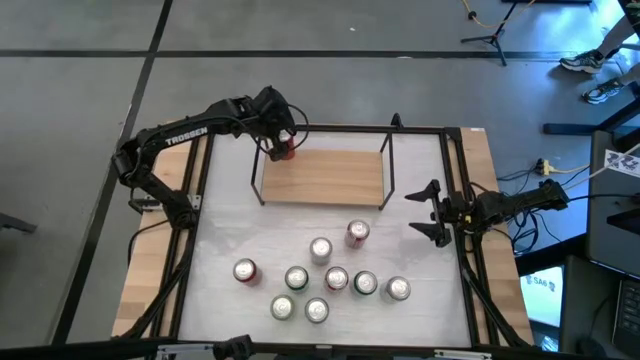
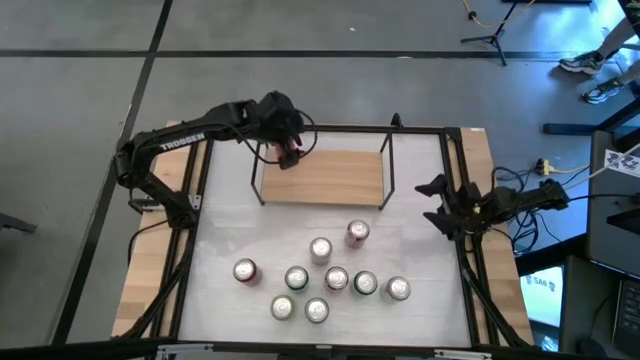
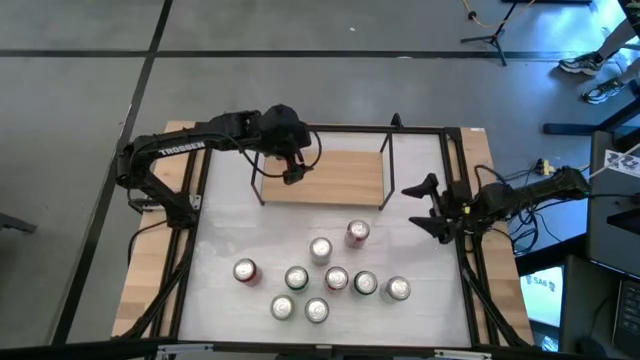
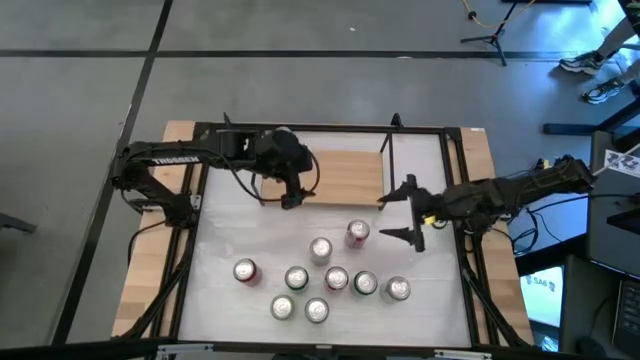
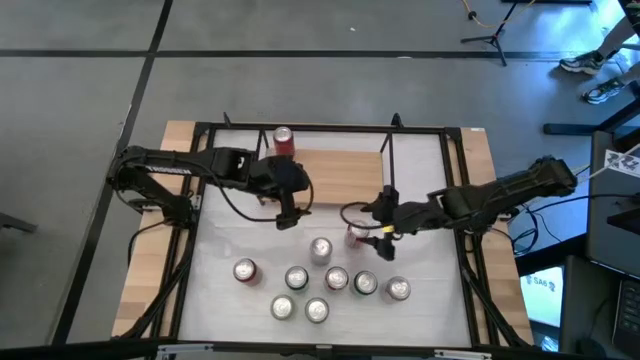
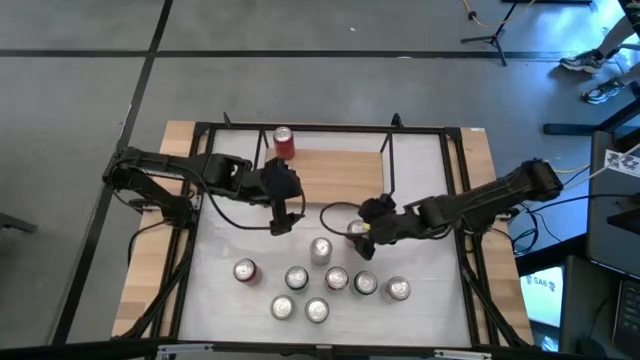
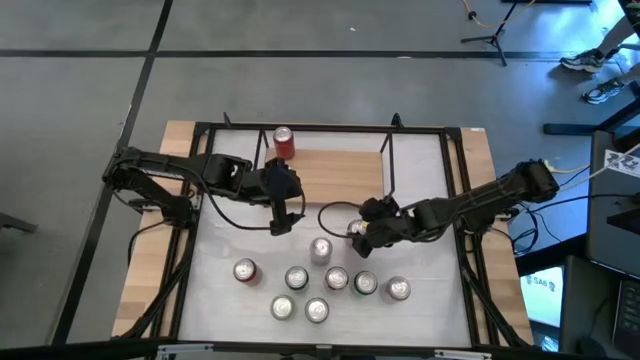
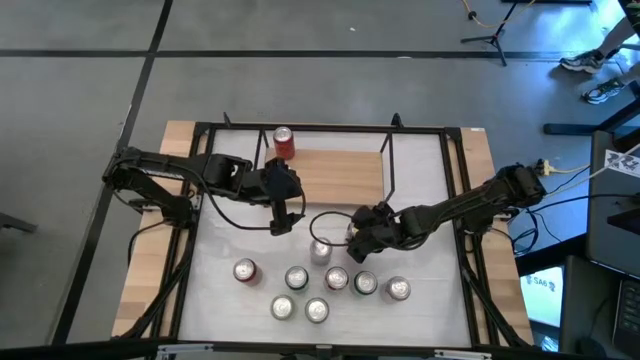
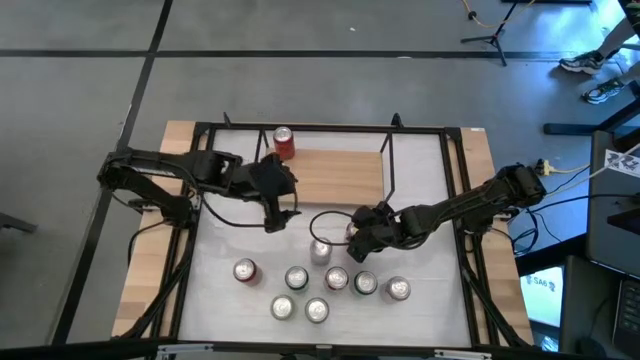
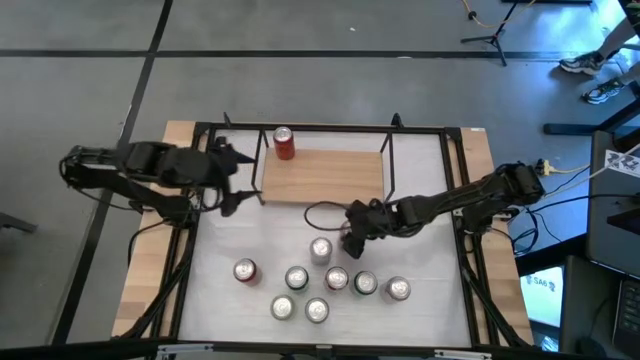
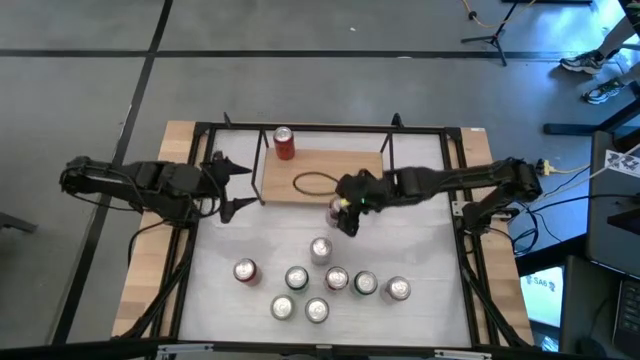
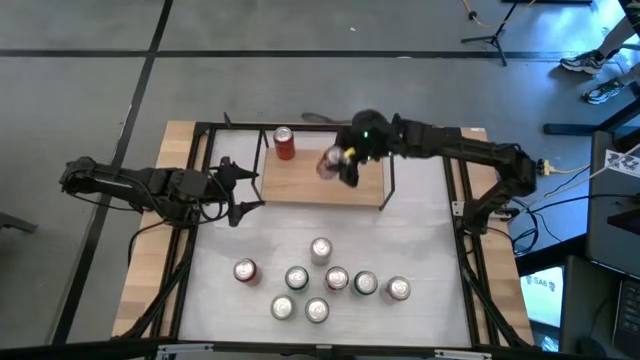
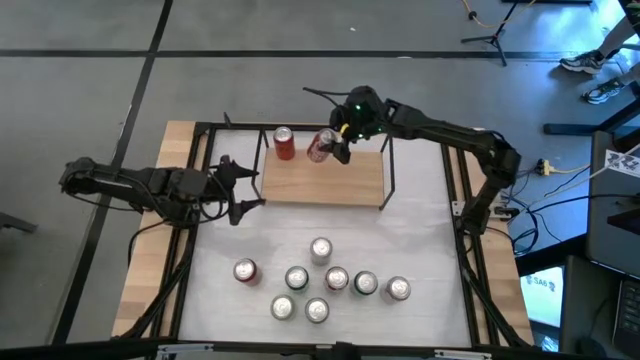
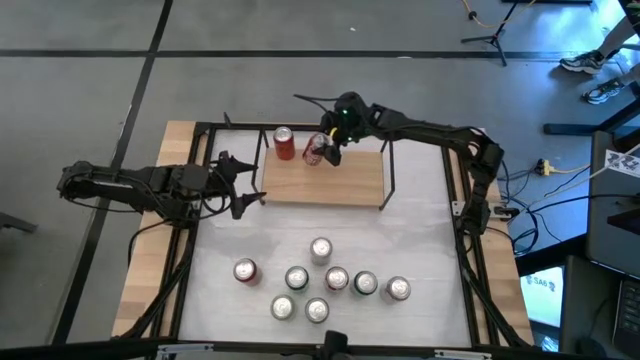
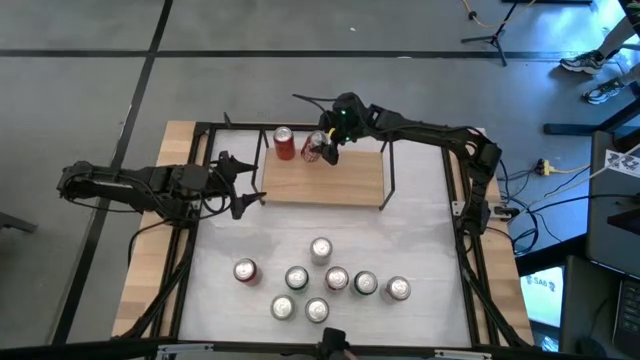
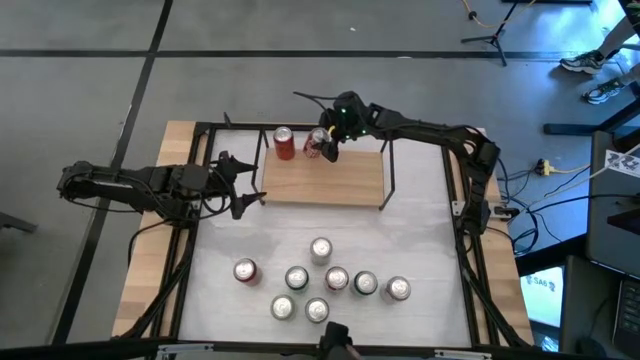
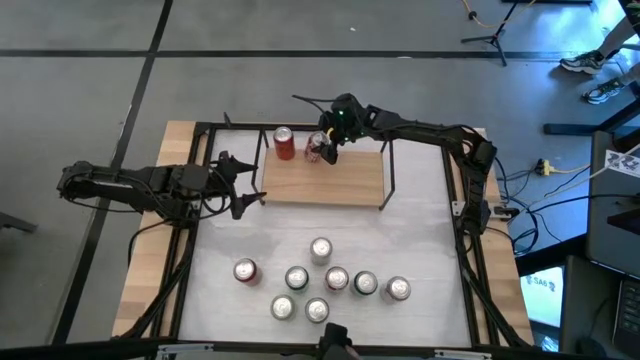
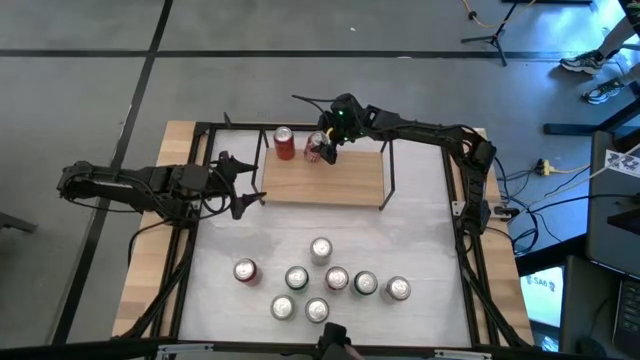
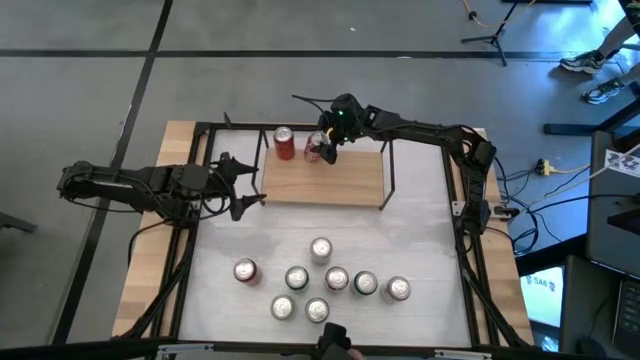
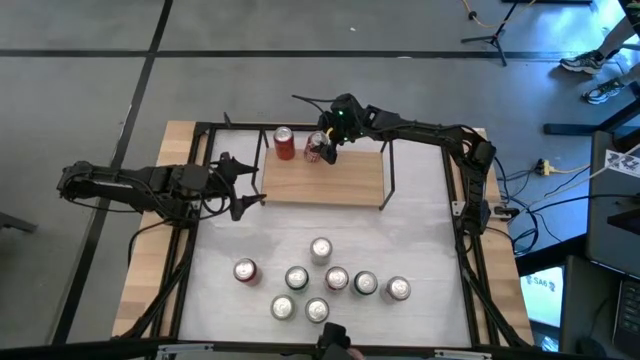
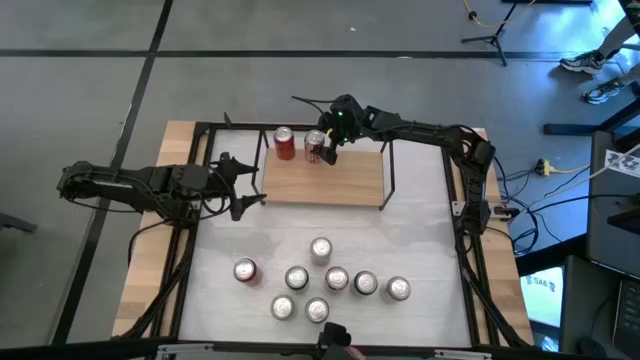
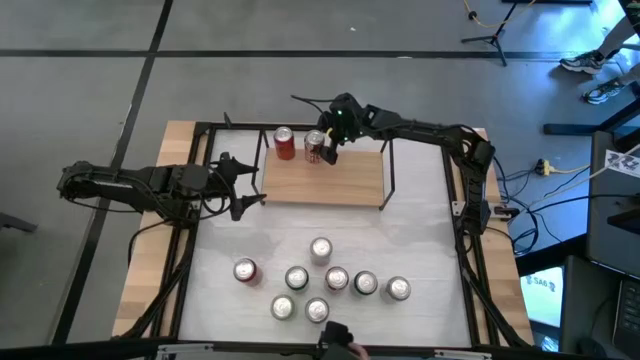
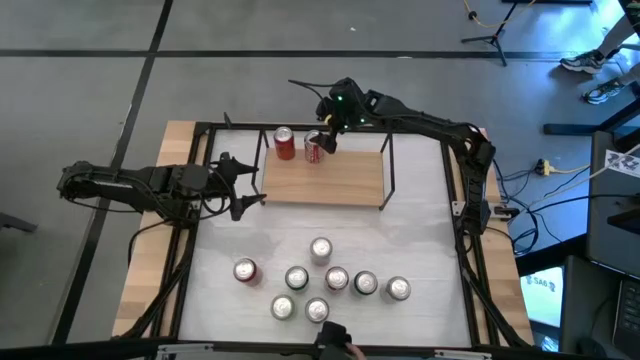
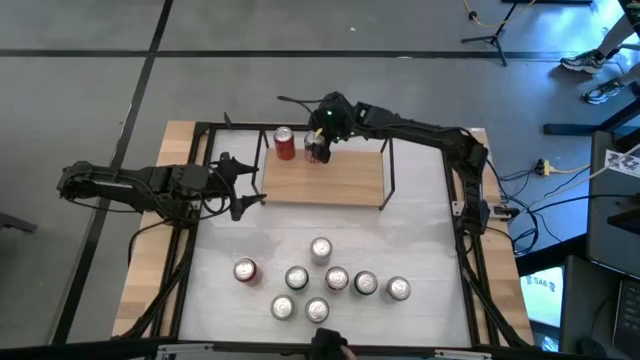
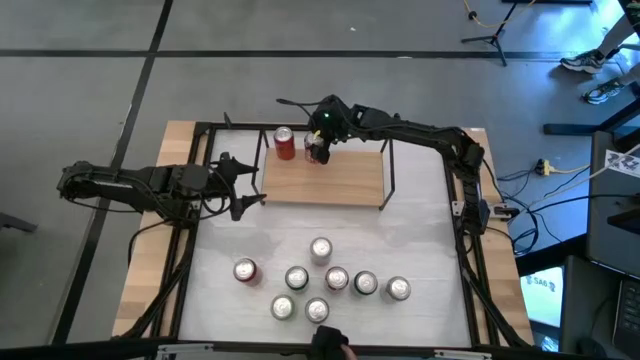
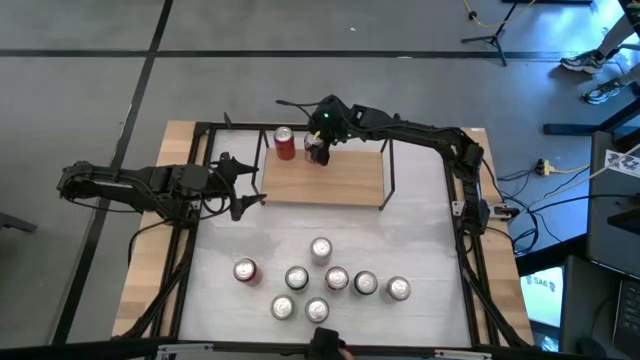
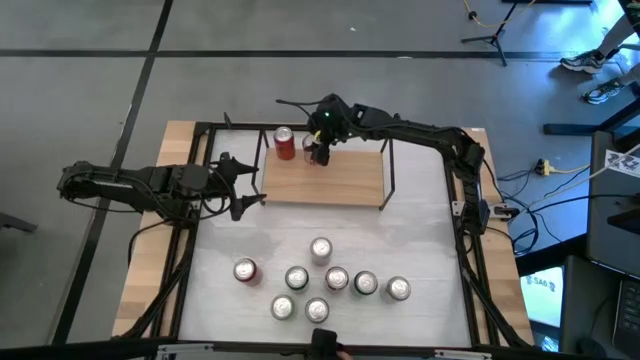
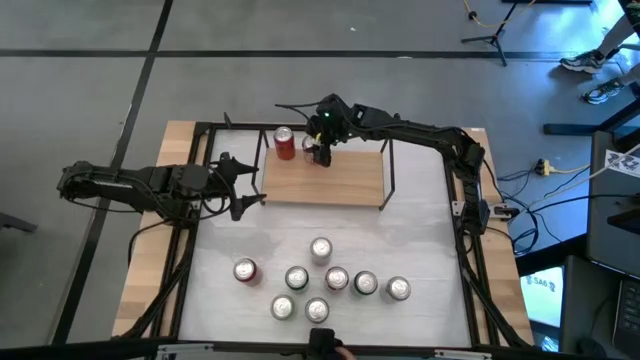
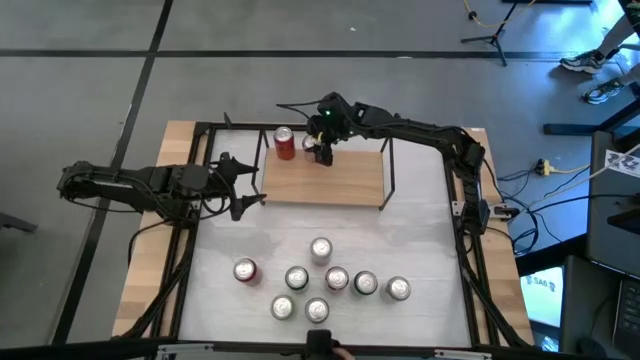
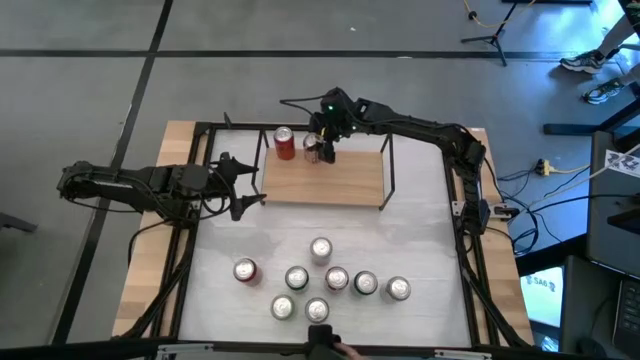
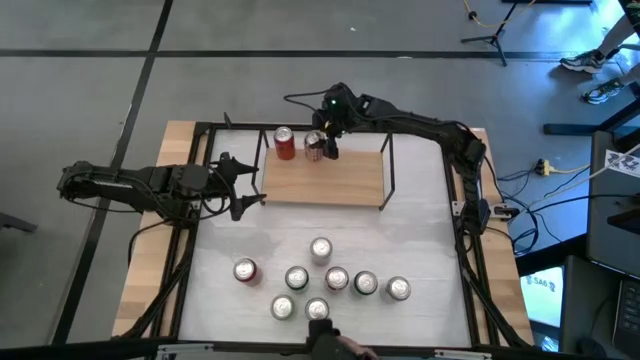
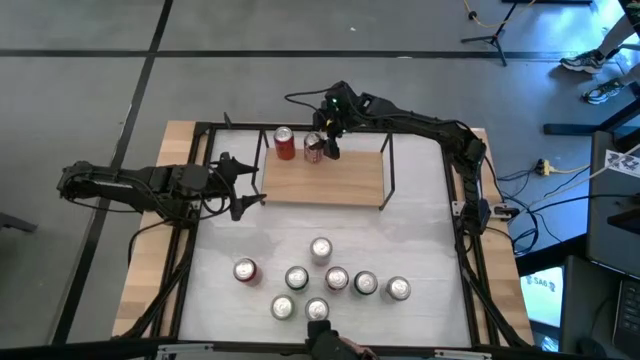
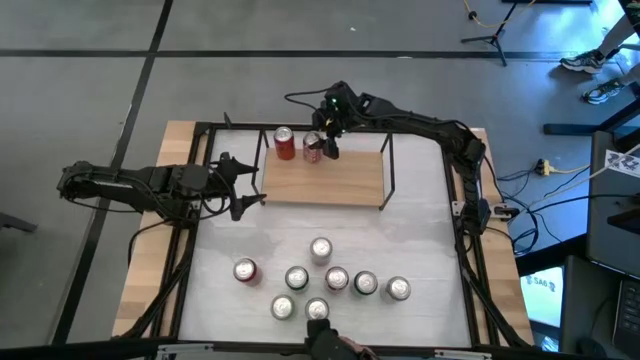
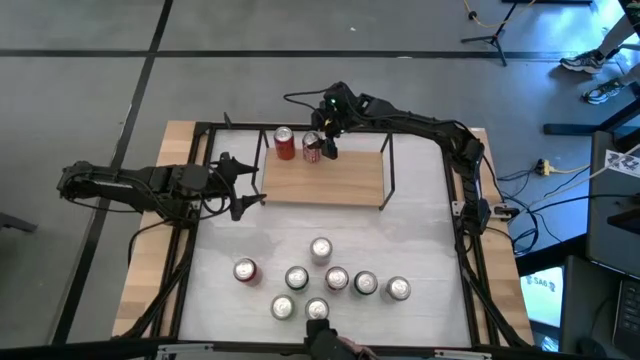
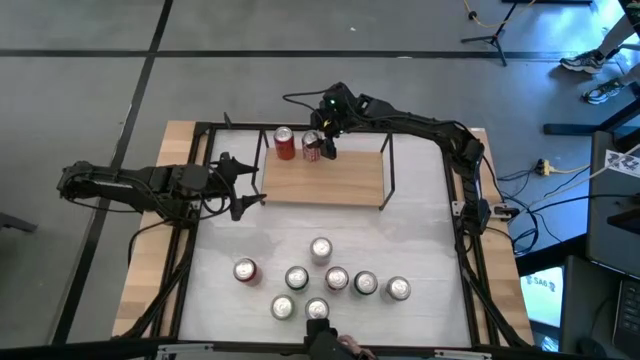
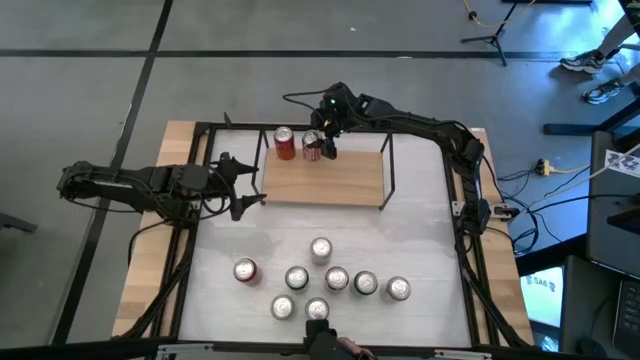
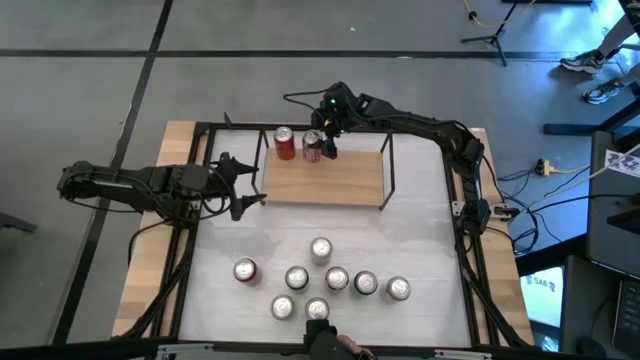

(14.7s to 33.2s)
Task: Place canned beverage on shelf
Put the red white soda can on the shelf
